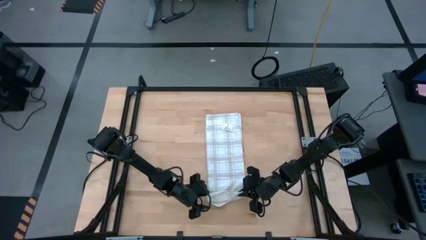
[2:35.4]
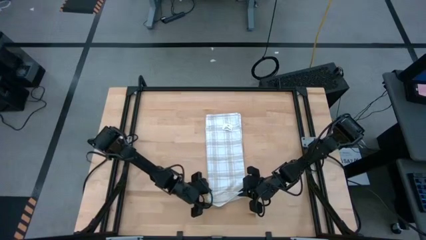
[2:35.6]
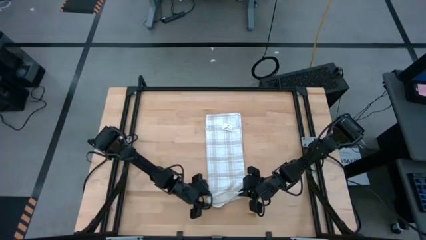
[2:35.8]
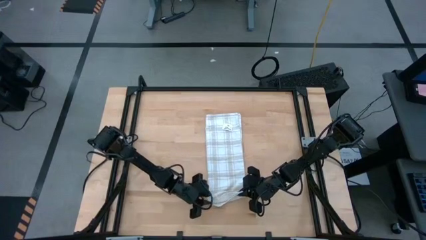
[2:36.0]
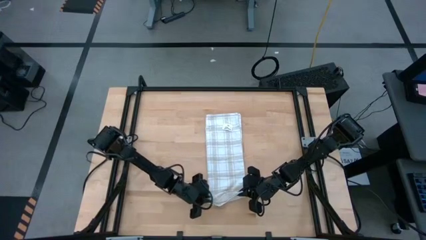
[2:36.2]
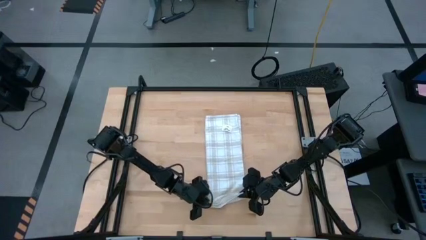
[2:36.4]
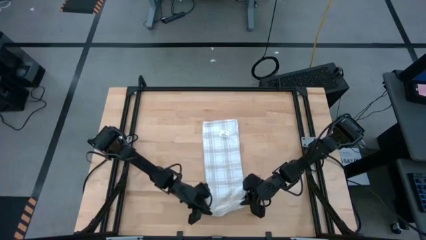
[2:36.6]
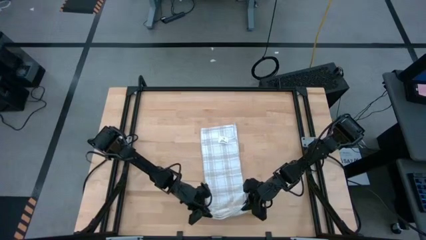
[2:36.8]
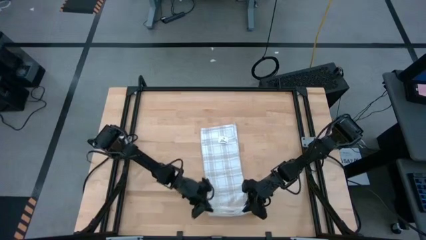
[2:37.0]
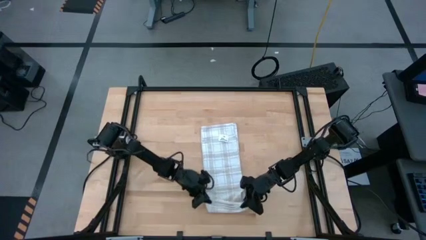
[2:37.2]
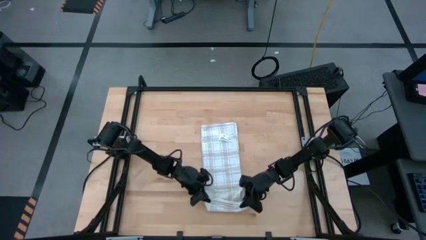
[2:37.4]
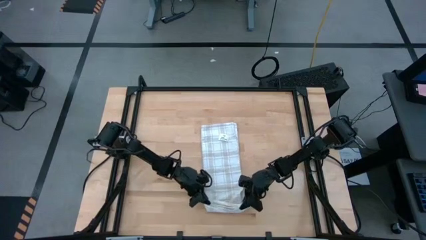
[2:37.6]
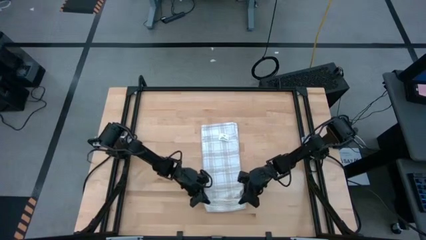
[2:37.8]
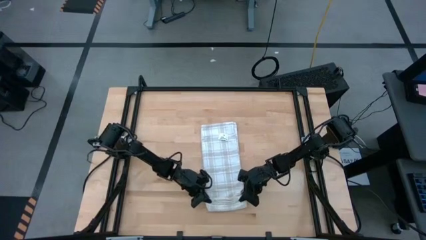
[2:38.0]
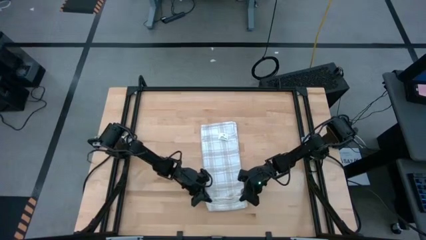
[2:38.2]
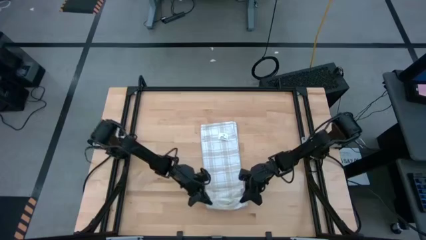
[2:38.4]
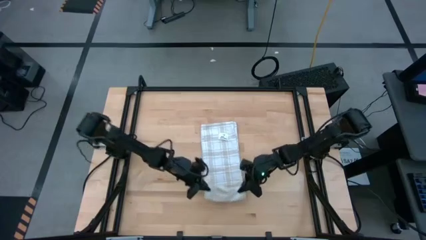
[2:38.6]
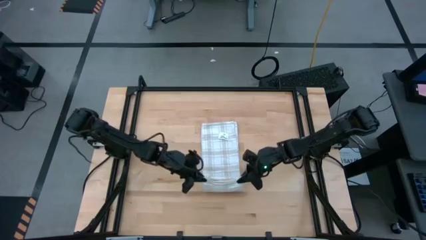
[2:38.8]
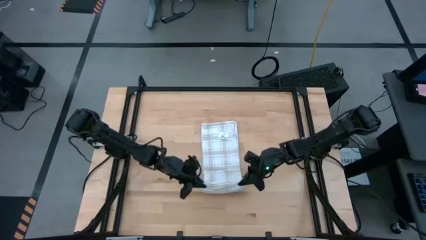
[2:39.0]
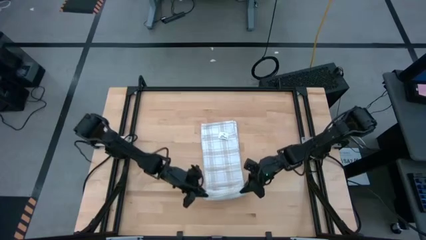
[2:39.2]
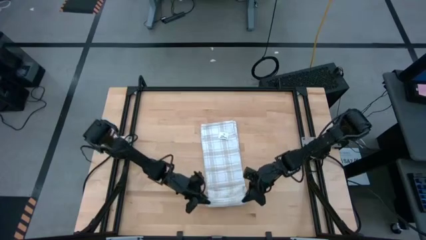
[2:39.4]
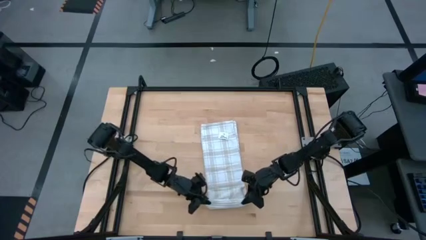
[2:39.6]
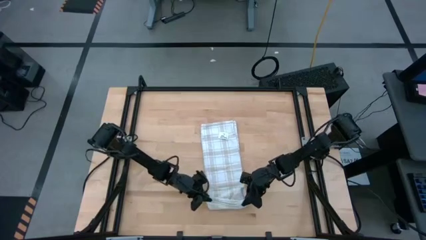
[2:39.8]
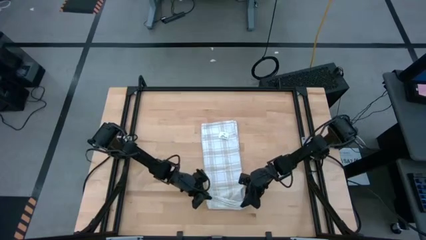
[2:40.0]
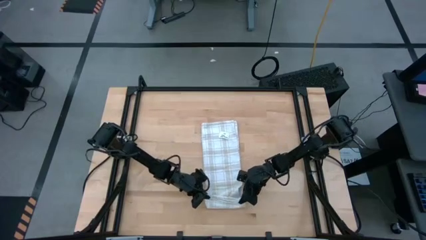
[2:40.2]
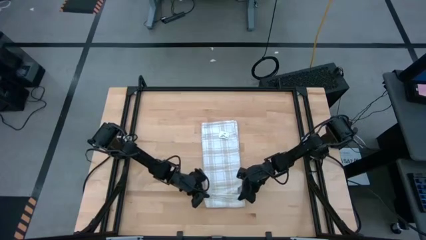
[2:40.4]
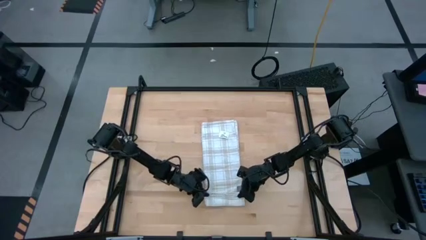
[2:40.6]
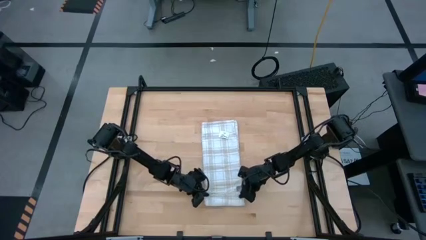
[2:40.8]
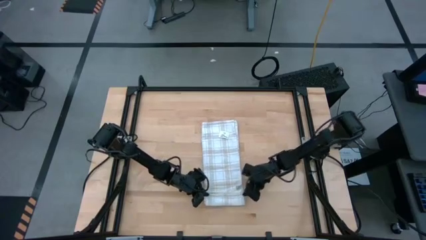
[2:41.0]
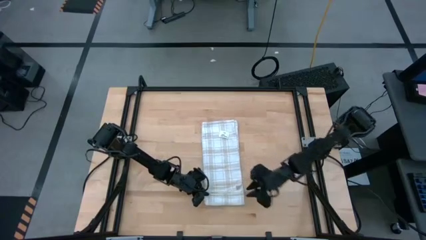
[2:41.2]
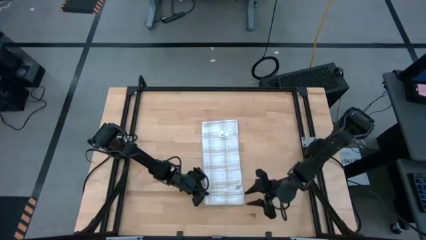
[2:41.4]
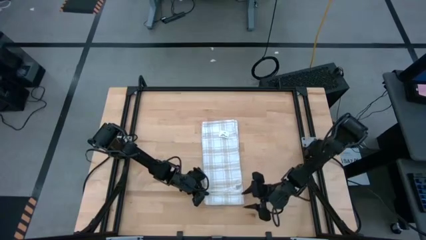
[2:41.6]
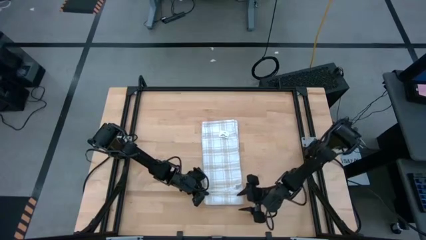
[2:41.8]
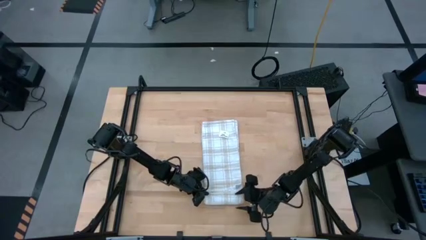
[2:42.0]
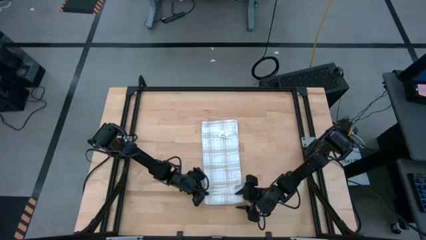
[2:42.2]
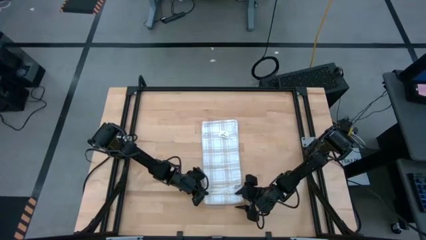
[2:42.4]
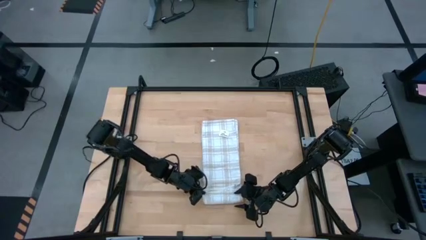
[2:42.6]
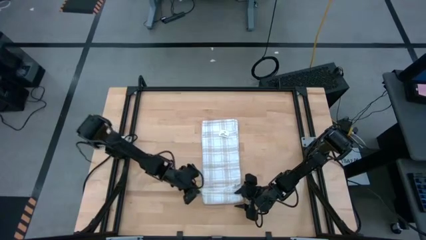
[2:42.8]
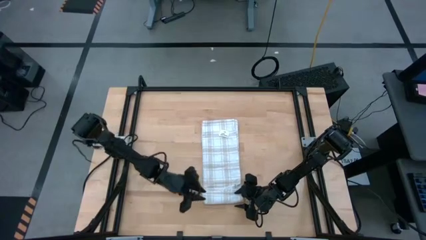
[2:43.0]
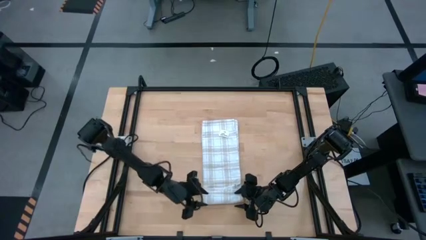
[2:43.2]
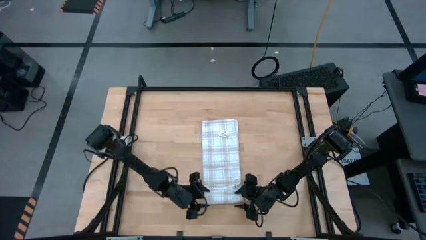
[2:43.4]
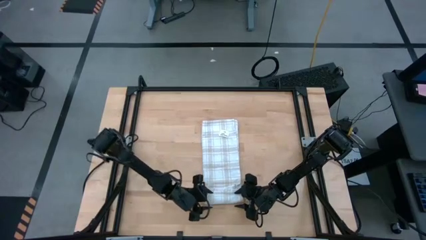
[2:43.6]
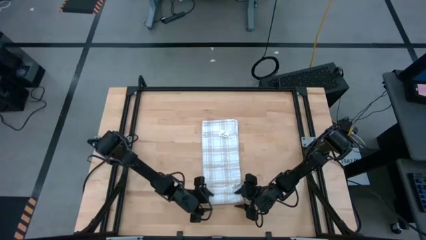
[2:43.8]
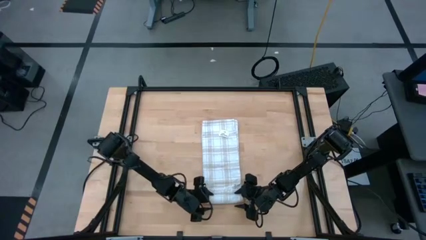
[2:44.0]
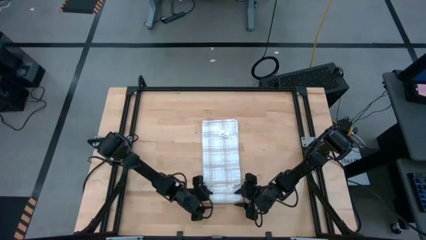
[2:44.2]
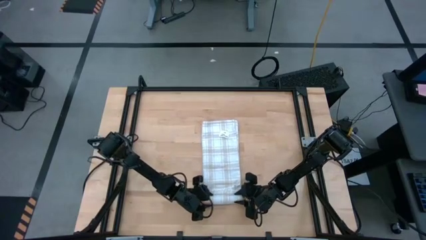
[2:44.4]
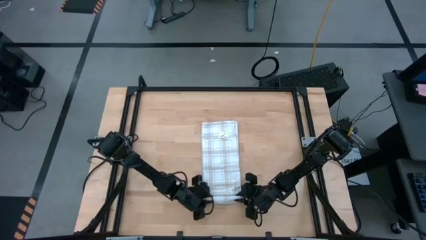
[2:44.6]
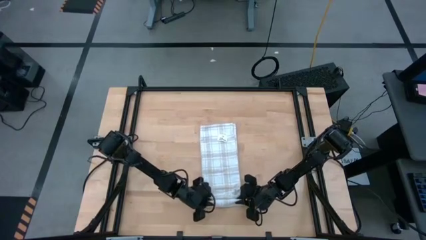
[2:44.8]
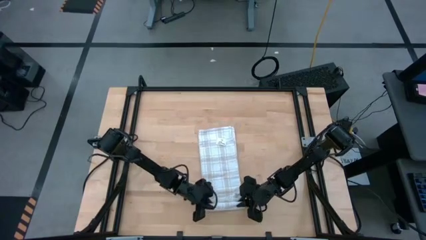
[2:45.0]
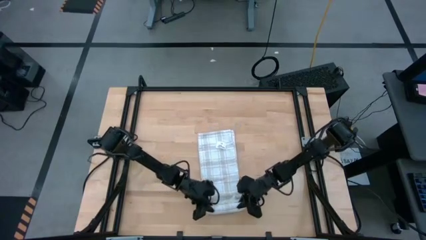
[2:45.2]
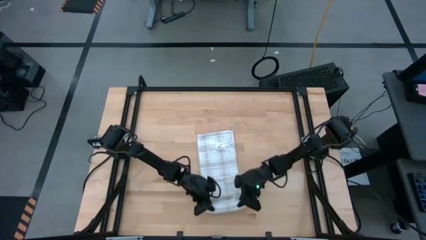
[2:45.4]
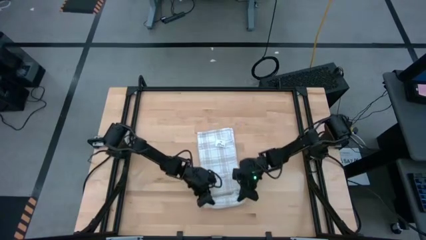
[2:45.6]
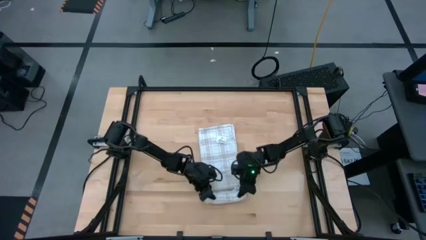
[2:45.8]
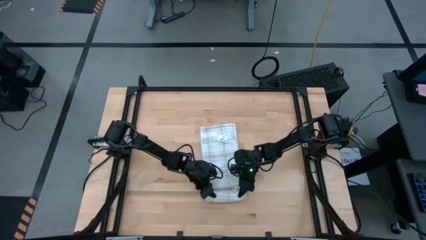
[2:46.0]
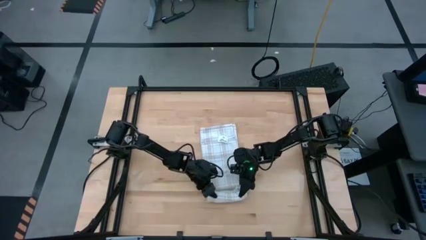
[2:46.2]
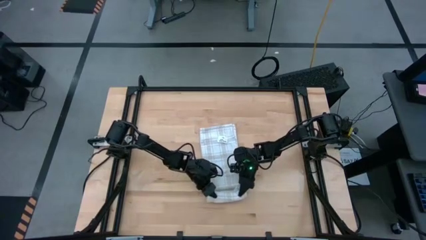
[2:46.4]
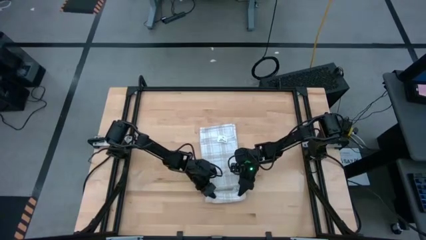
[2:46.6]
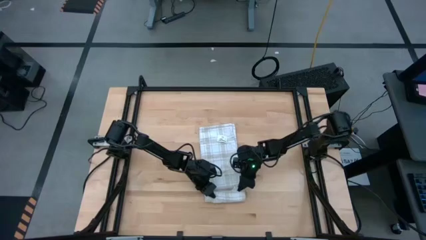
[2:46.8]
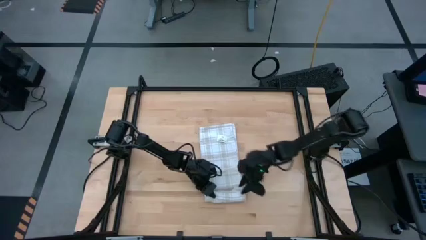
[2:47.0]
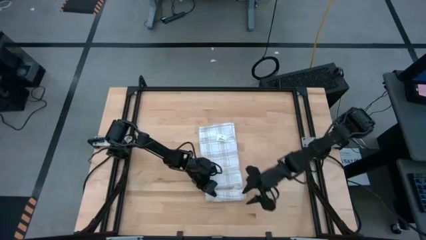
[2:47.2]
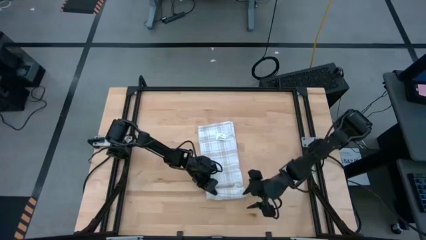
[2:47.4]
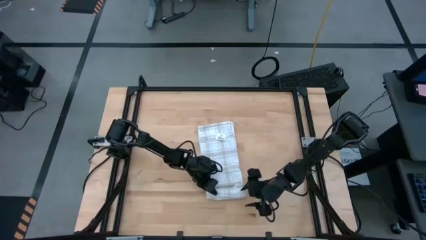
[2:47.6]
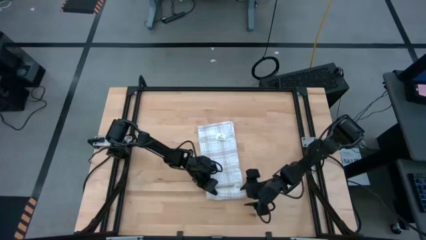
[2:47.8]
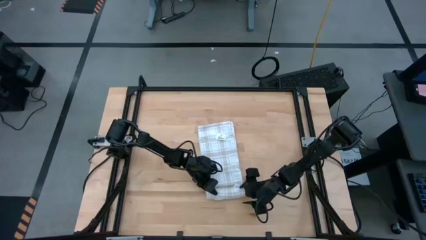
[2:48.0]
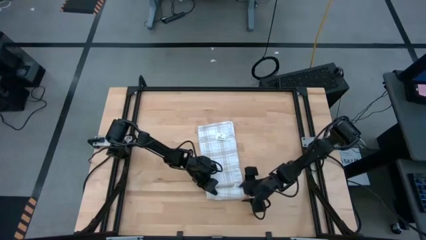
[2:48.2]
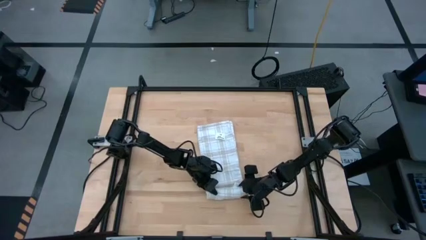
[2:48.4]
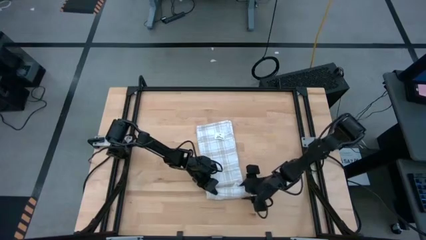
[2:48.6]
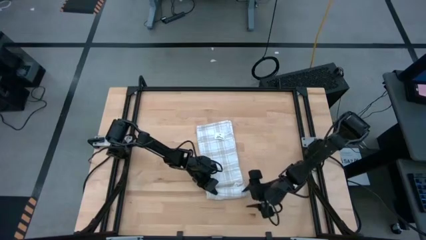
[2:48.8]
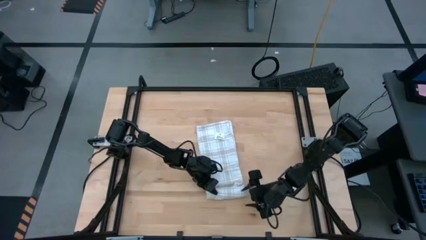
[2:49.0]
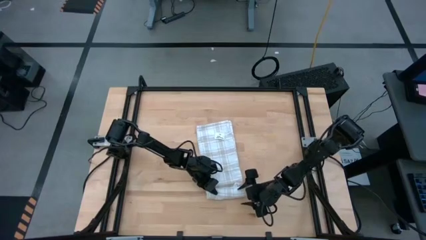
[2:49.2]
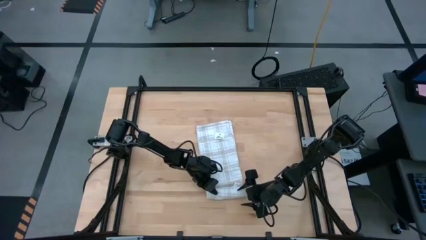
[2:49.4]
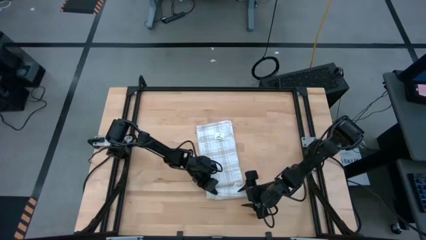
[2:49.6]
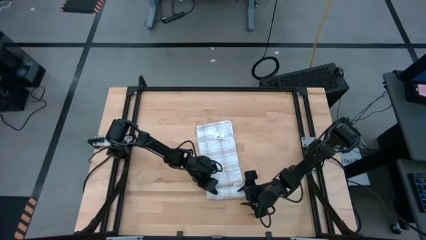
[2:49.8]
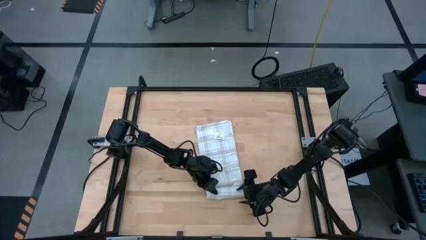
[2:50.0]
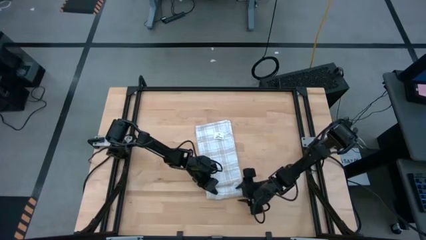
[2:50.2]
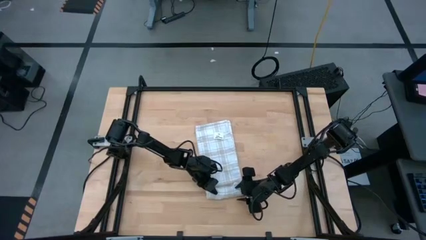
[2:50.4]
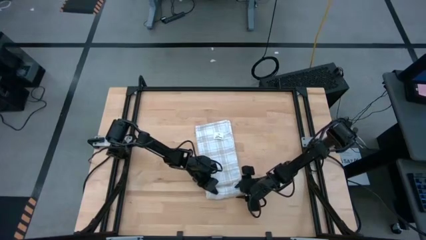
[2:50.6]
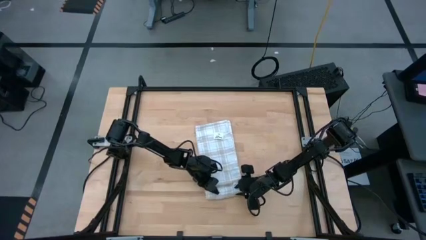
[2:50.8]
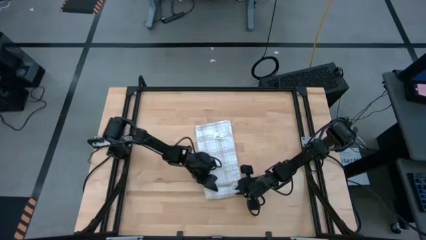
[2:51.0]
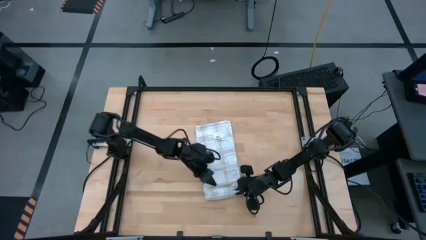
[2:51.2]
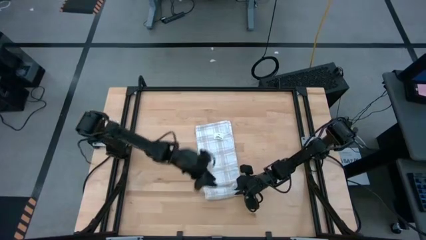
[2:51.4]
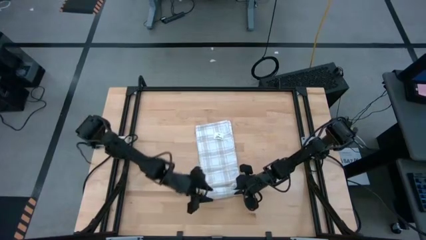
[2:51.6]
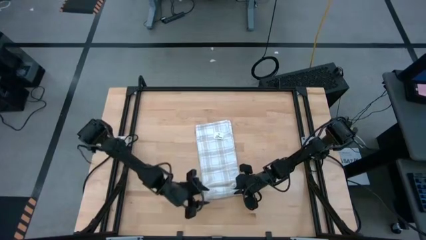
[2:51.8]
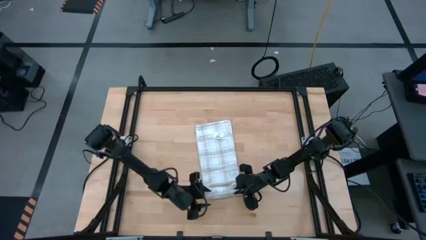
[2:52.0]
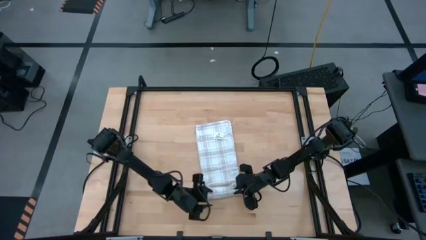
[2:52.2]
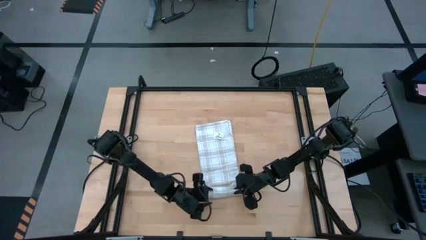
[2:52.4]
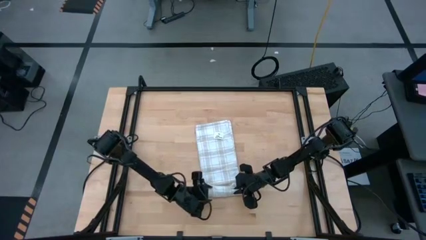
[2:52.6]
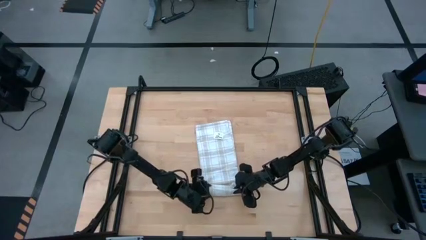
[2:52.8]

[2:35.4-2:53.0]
Task: Roll towel
Roll the towel
